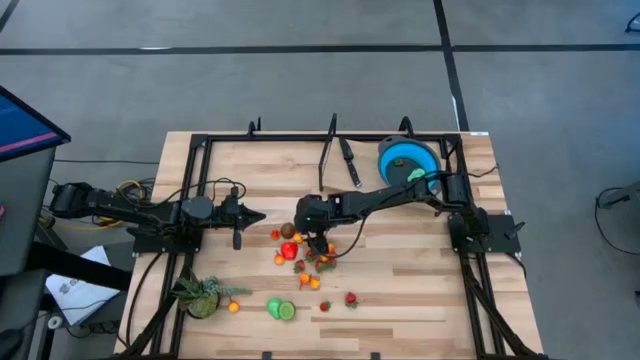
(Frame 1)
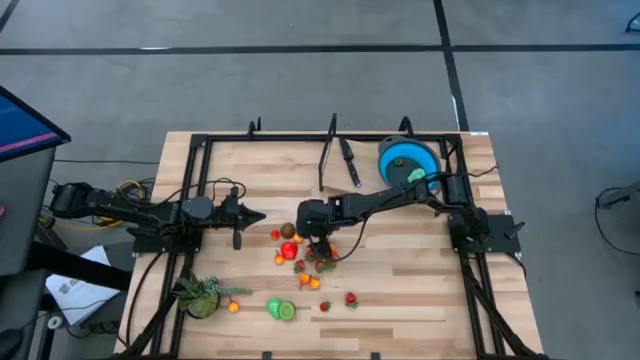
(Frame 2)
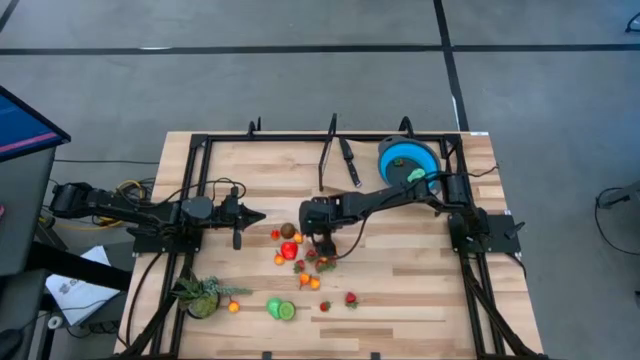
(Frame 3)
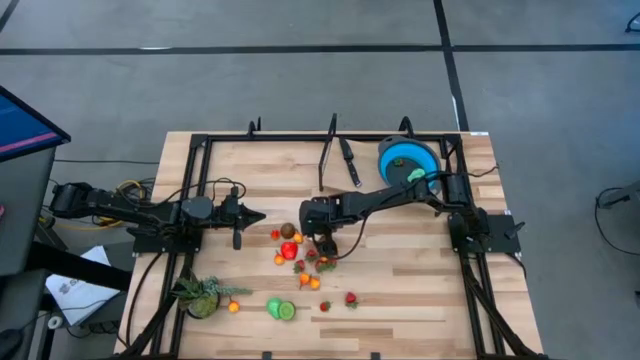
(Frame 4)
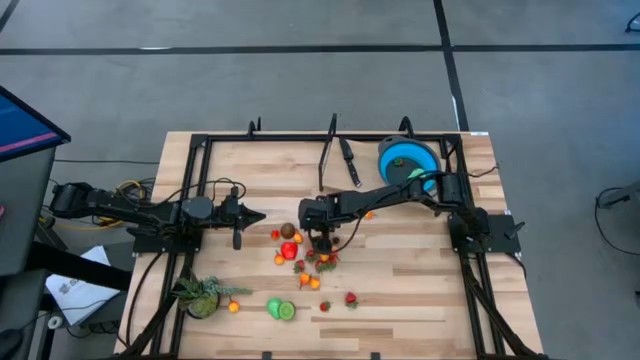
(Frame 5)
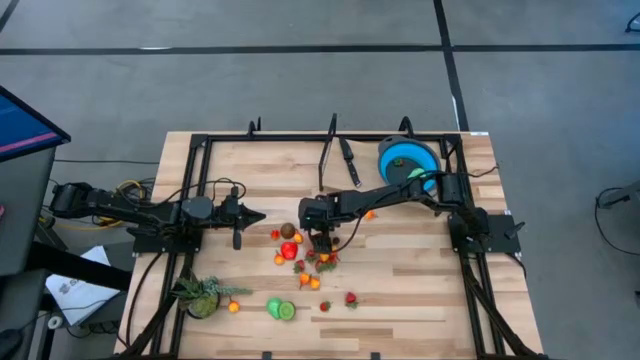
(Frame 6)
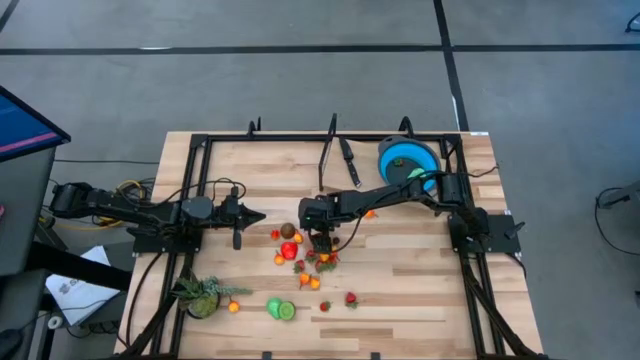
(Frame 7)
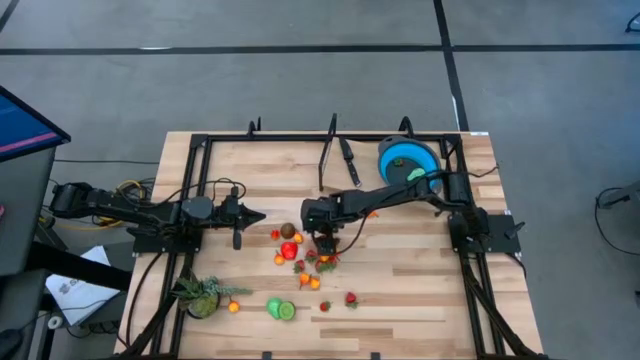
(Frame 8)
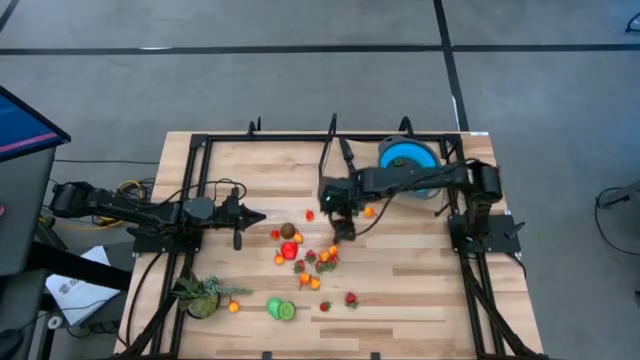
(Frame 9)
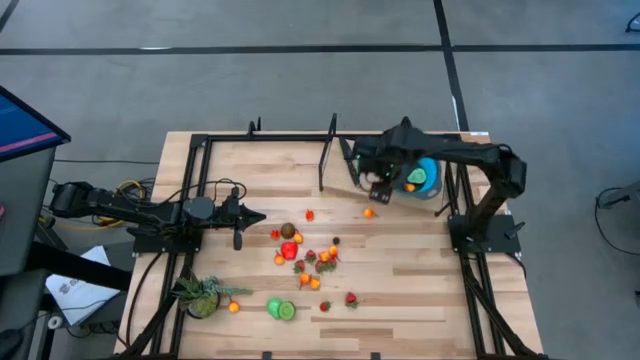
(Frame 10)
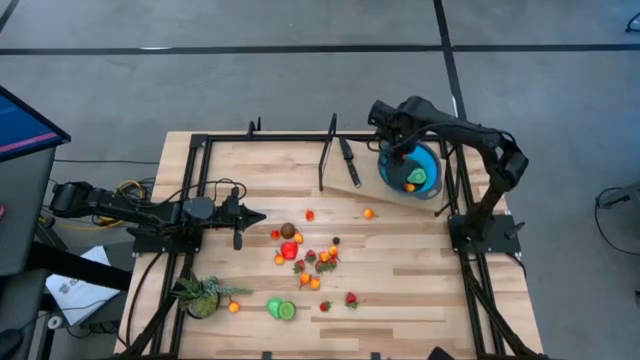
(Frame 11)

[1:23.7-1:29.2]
Task: Pick & Place Fruit
Put the half red apple into the blue colander

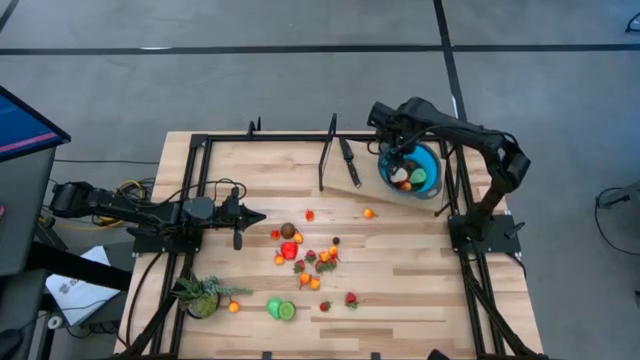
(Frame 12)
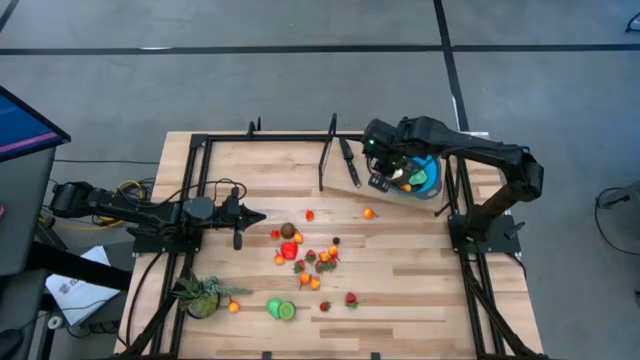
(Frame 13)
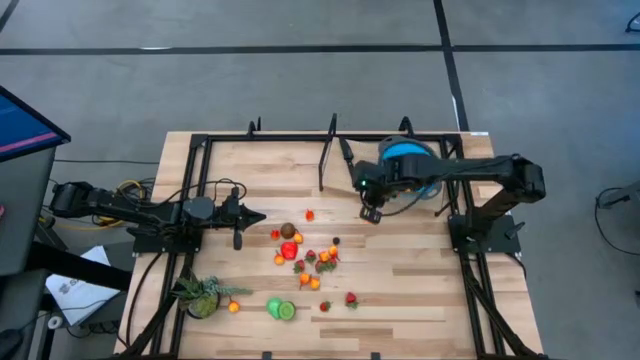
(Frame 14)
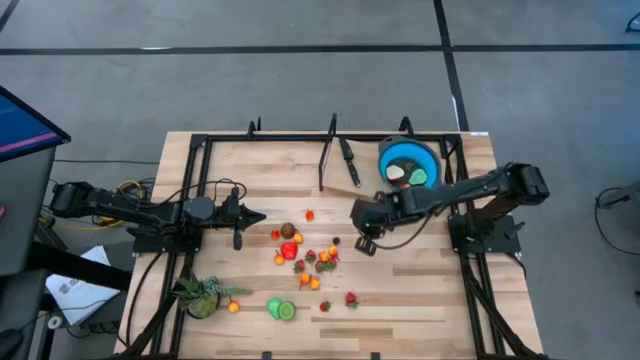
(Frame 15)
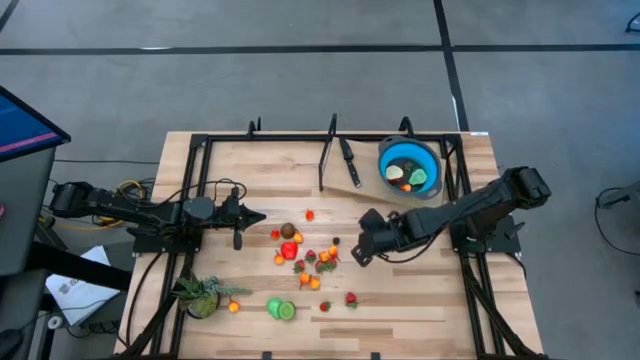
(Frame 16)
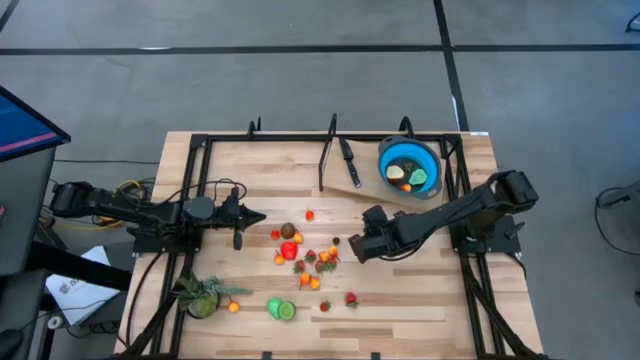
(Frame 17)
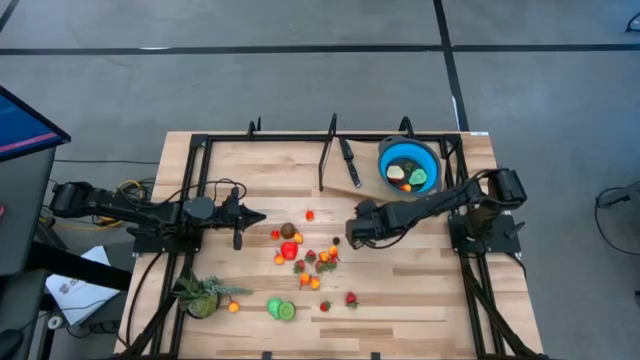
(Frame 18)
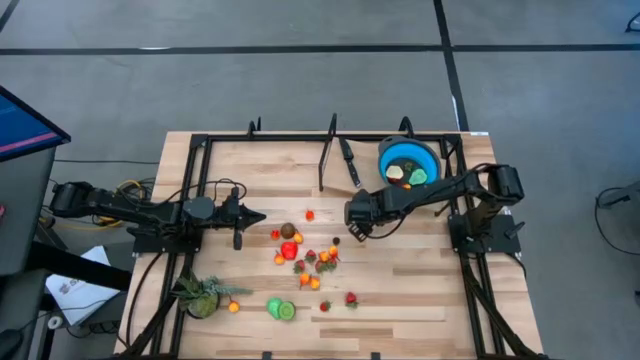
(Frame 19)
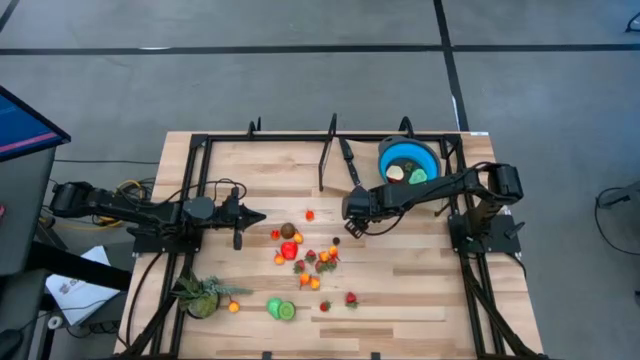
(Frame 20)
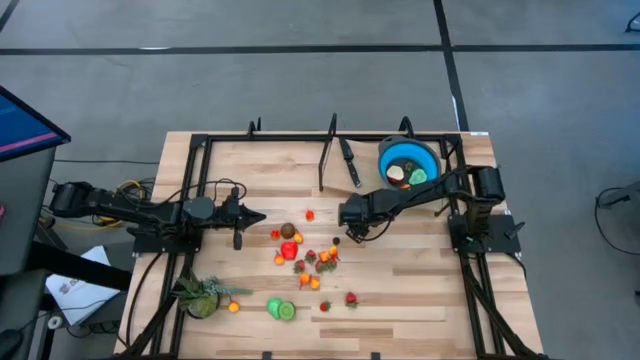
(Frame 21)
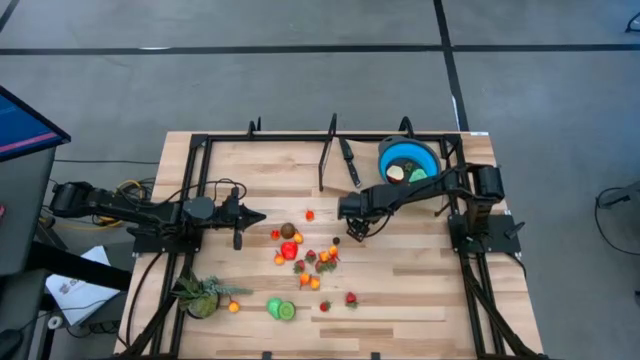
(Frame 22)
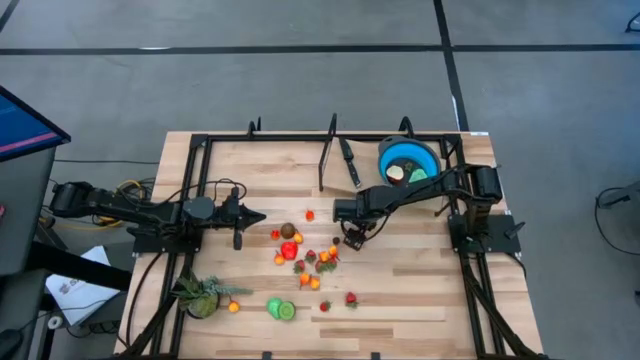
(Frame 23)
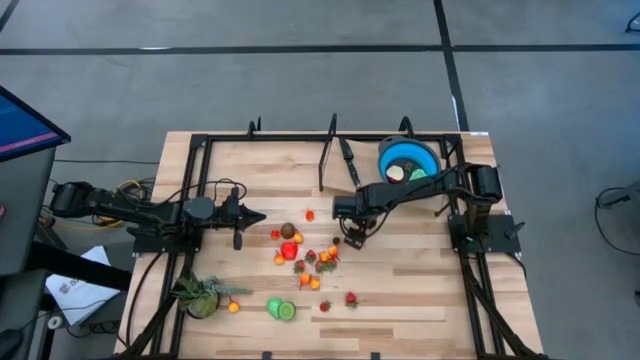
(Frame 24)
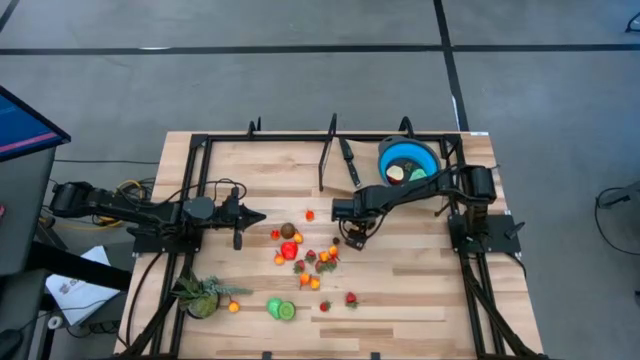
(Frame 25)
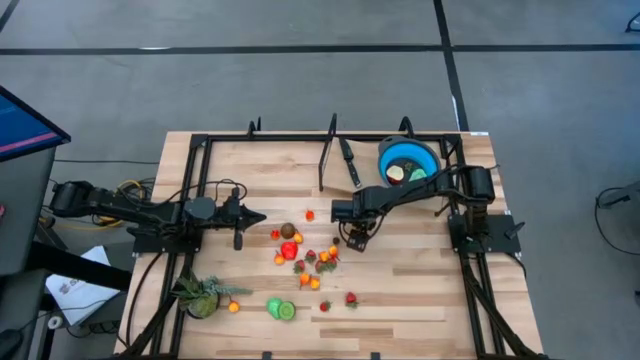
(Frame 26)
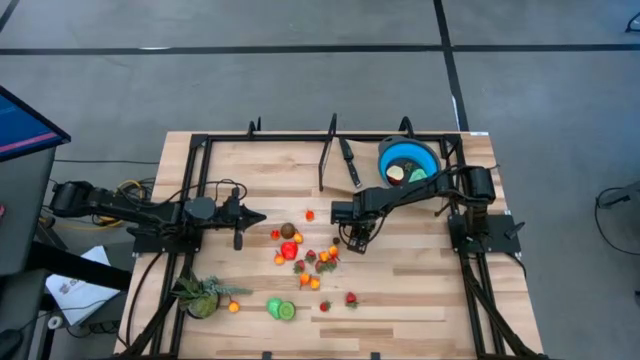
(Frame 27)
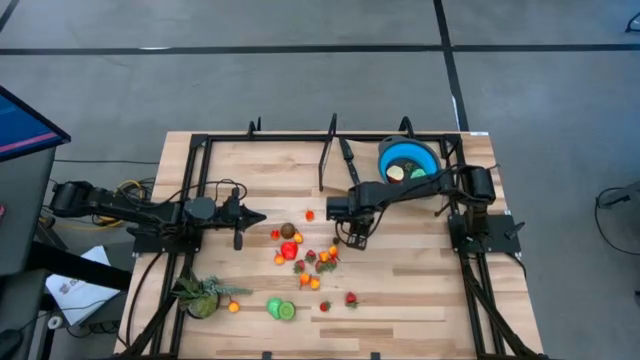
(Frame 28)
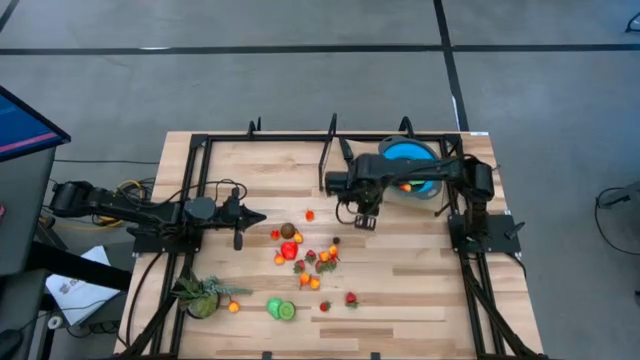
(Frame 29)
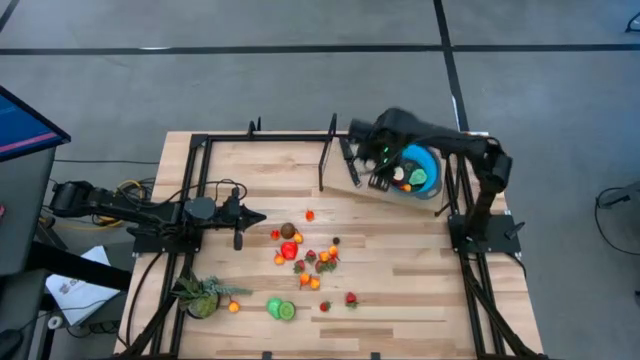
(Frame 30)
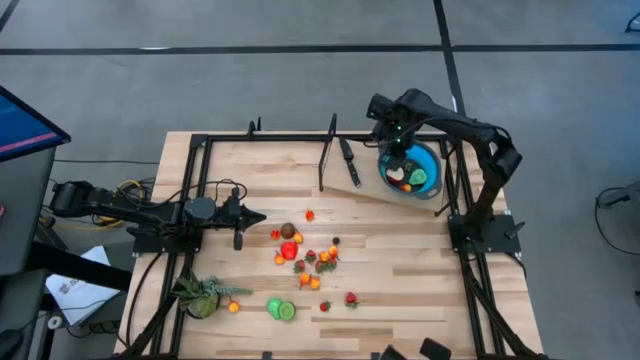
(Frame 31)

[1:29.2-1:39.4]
Put the orange pear into the blue colander

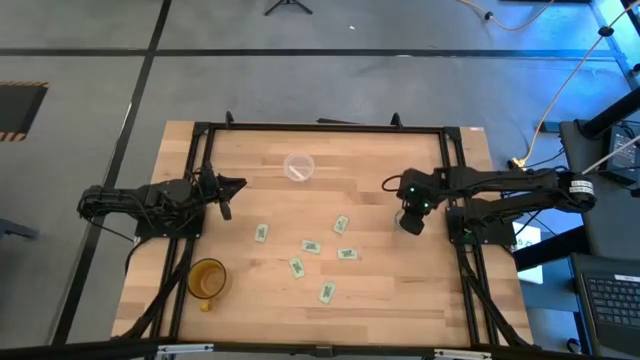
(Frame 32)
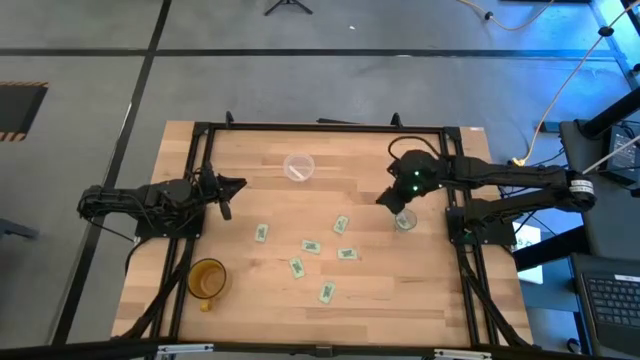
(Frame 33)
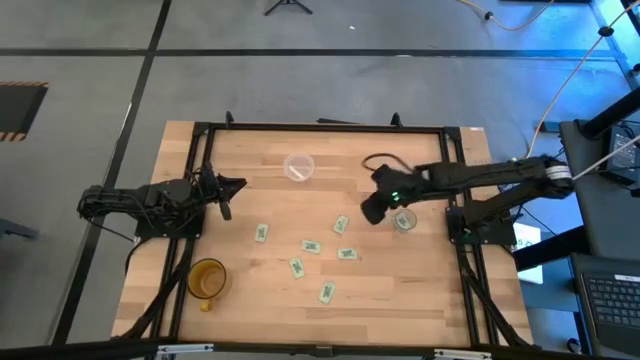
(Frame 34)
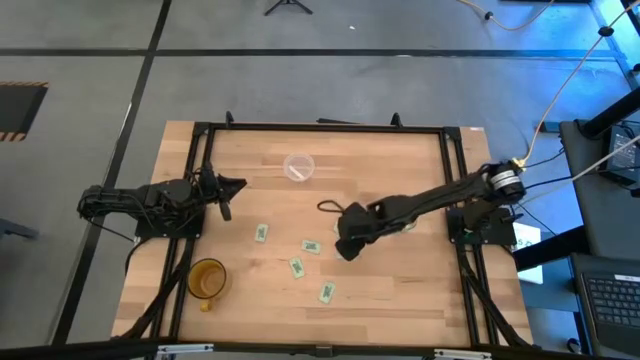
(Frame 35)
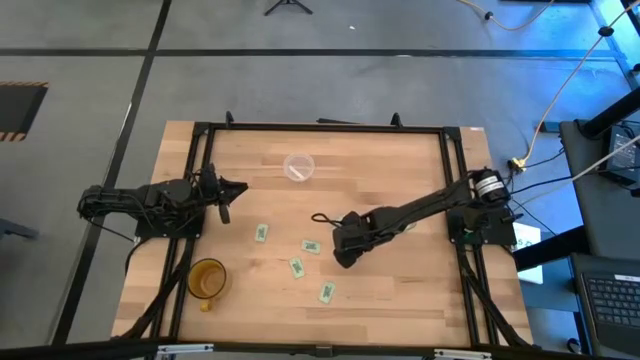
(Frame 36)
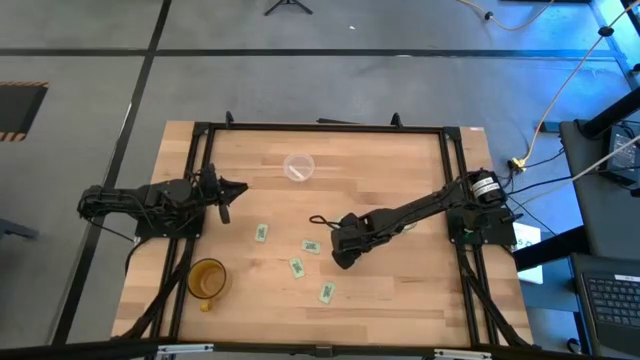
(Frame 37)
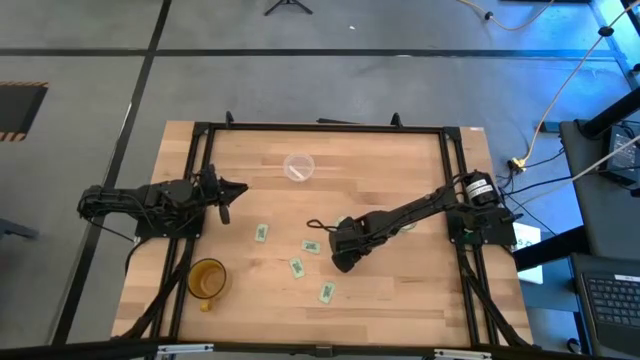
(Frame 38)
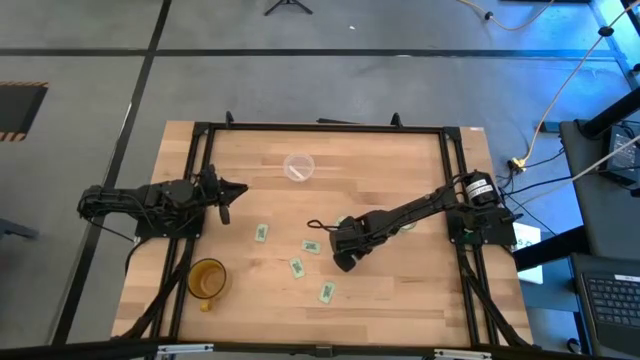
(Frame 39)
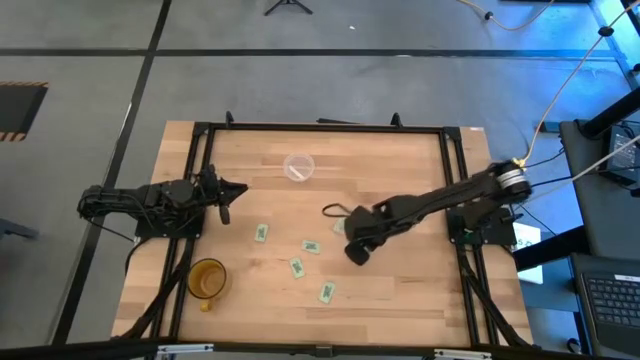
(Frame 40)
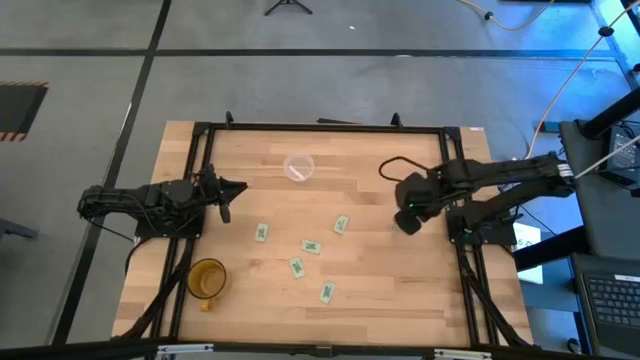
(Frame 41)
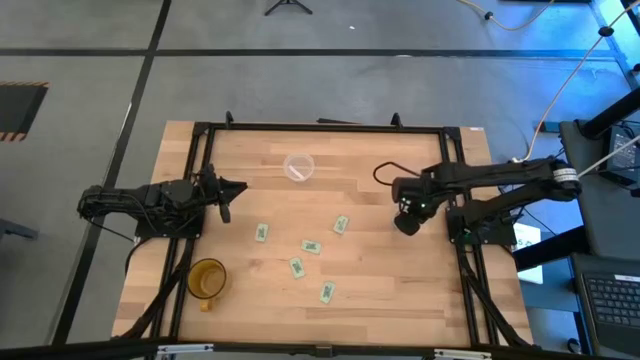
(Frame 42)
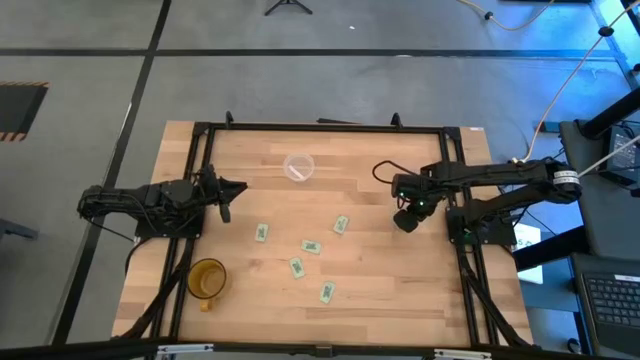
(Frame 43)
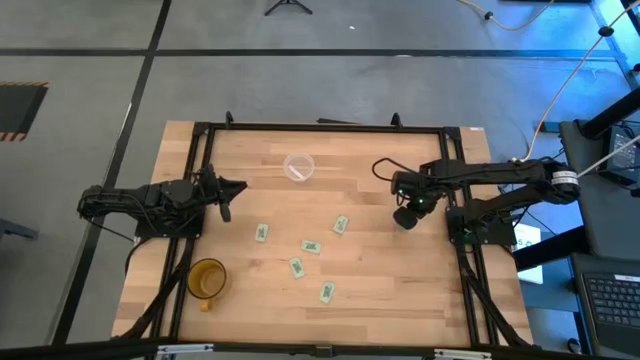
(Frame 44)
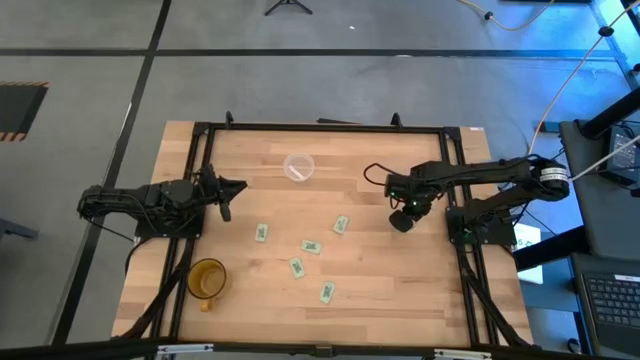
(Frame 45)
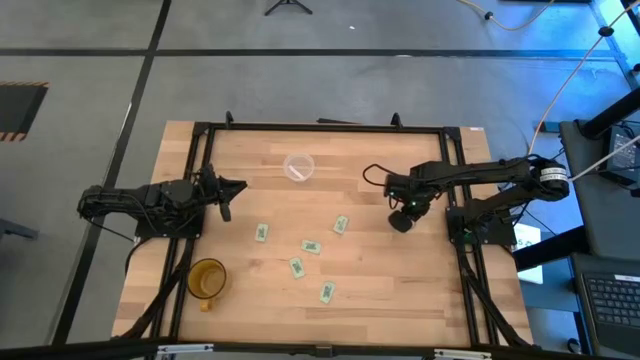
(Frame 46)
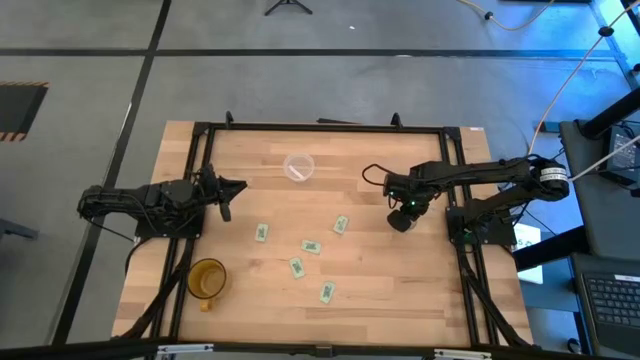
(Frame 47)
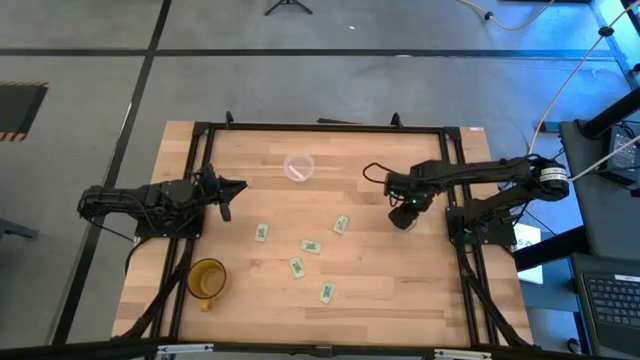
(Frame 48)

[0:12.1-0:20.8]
Task: Pick and place Stevia / Truvia into bins
Put the stevia packet into the transparent container
